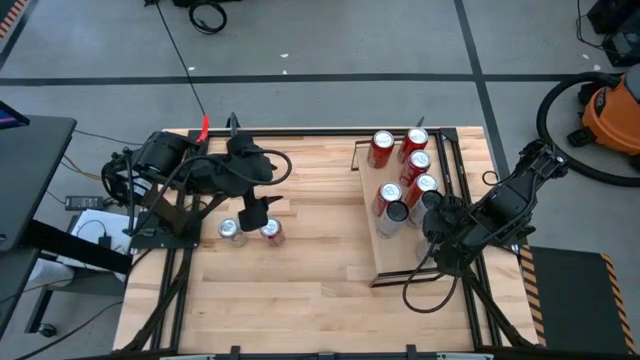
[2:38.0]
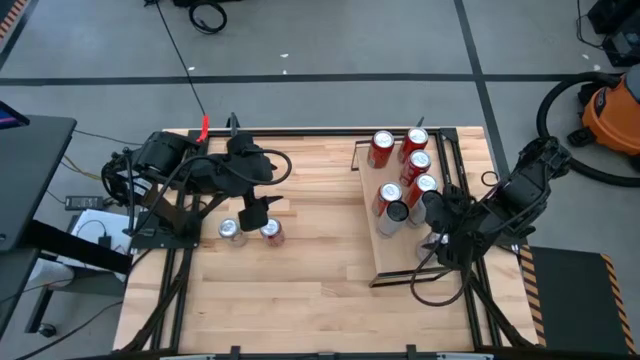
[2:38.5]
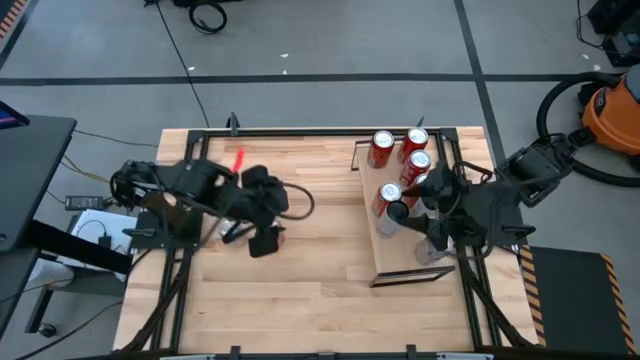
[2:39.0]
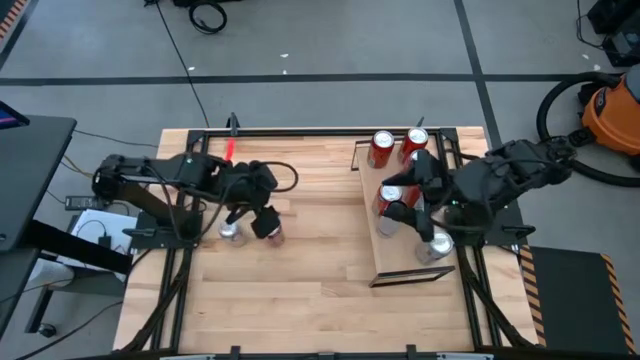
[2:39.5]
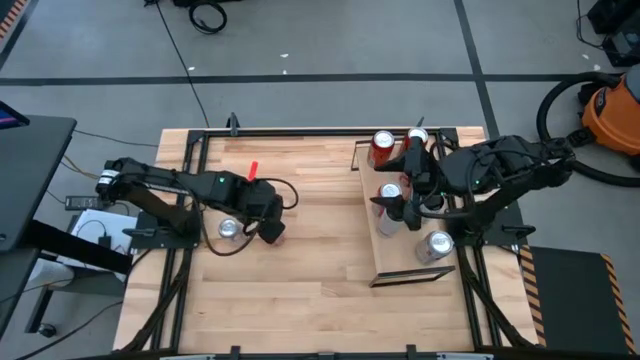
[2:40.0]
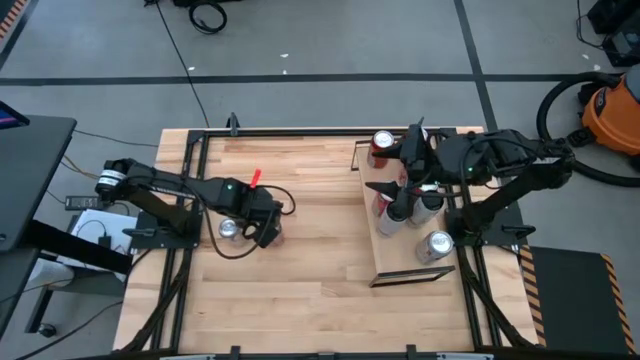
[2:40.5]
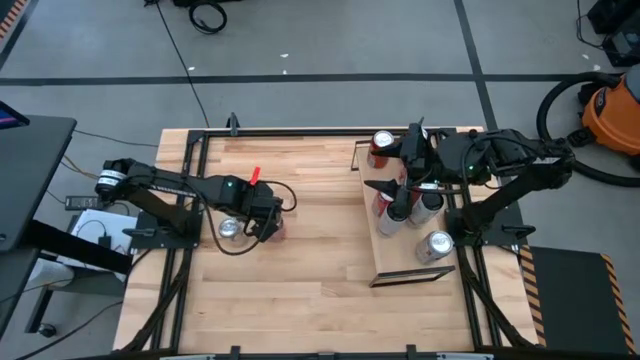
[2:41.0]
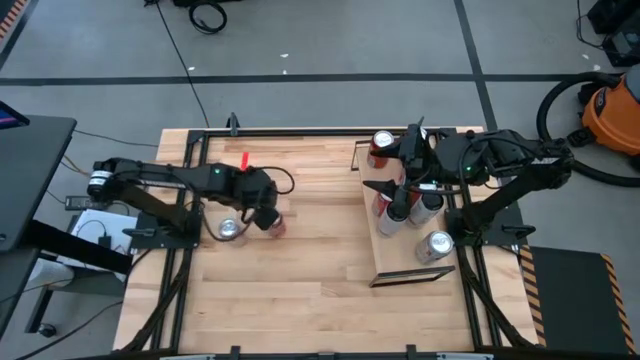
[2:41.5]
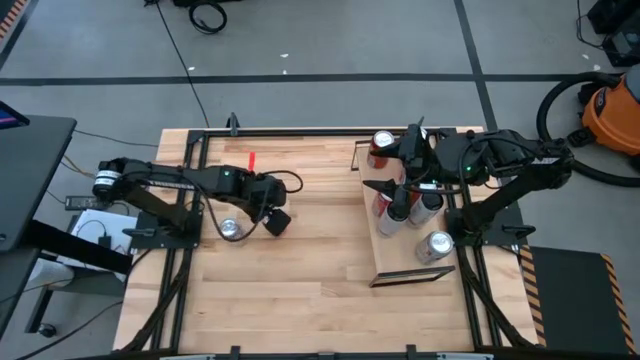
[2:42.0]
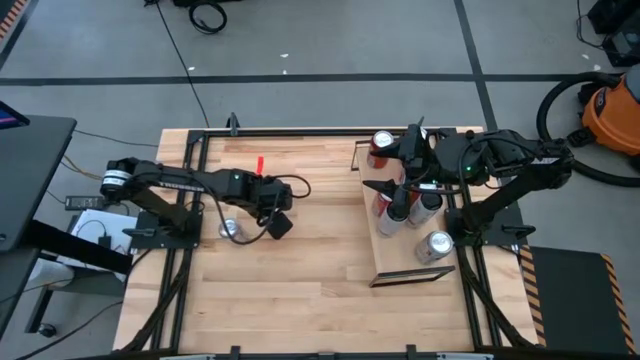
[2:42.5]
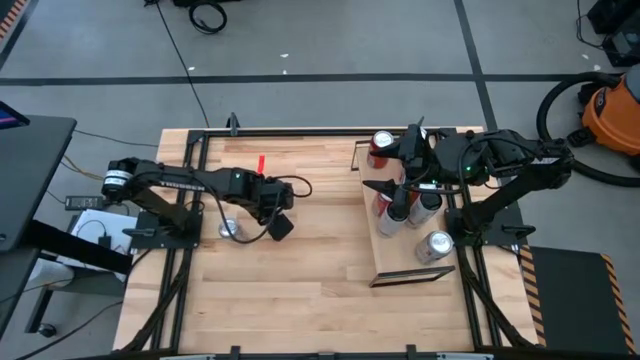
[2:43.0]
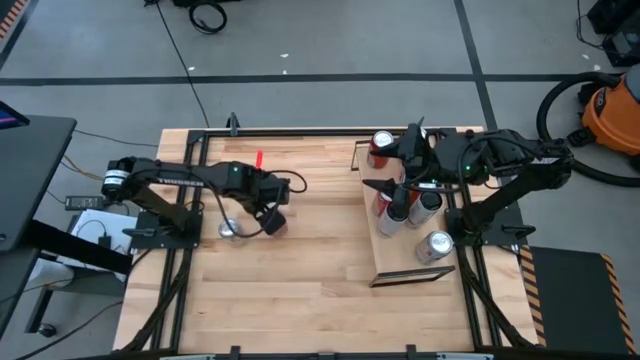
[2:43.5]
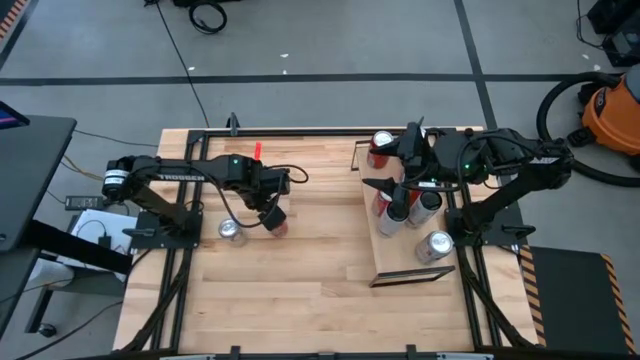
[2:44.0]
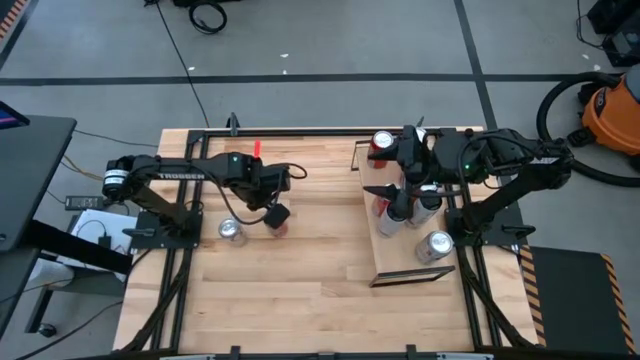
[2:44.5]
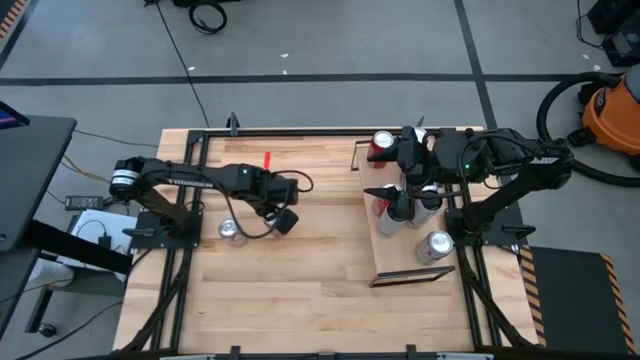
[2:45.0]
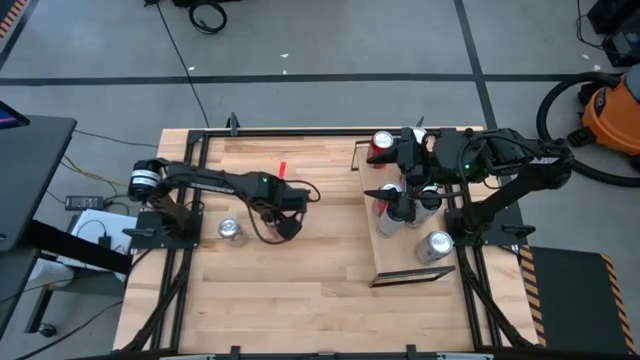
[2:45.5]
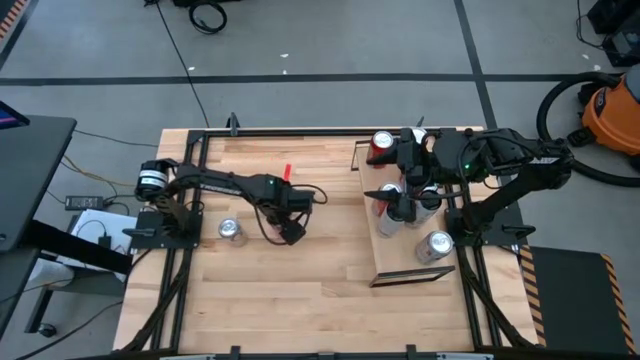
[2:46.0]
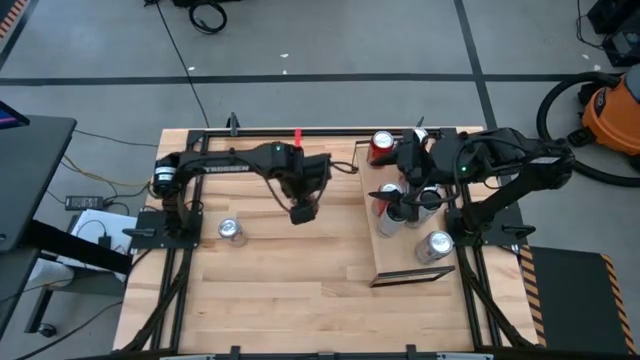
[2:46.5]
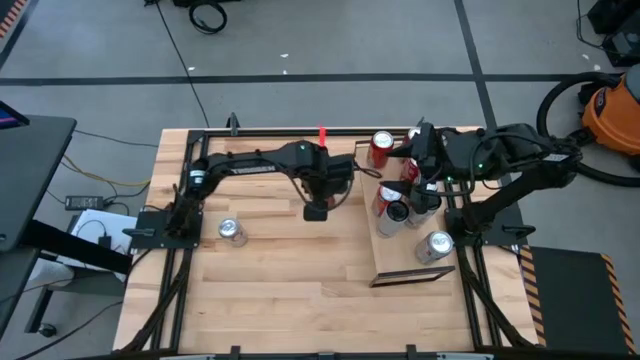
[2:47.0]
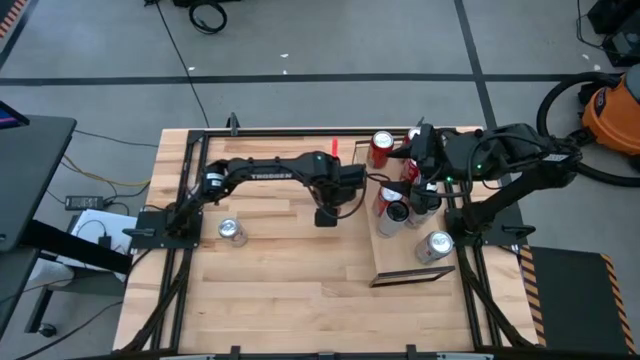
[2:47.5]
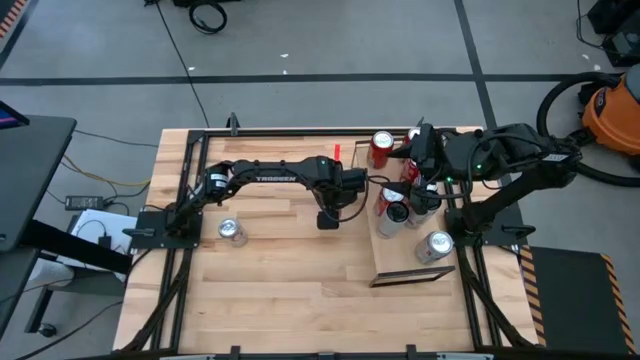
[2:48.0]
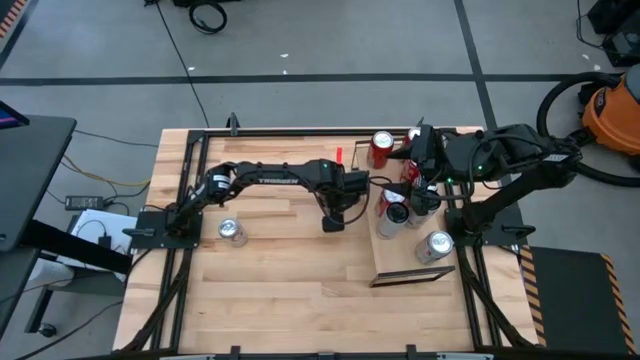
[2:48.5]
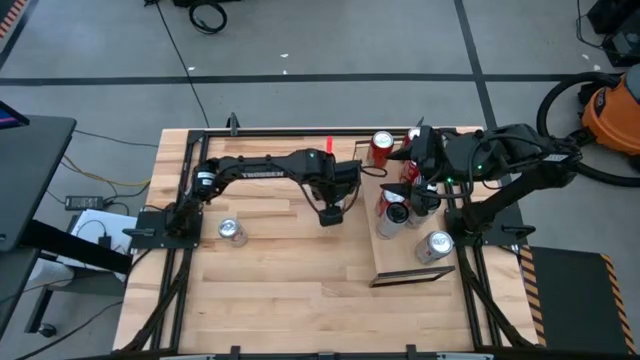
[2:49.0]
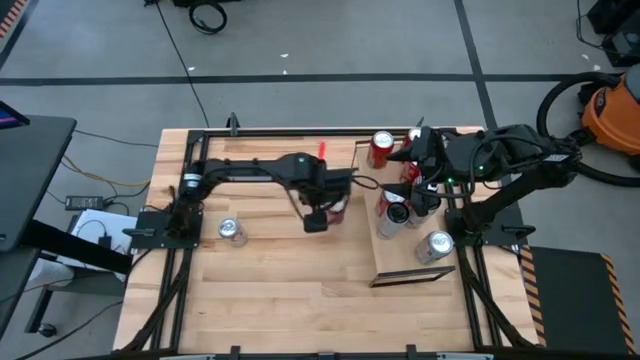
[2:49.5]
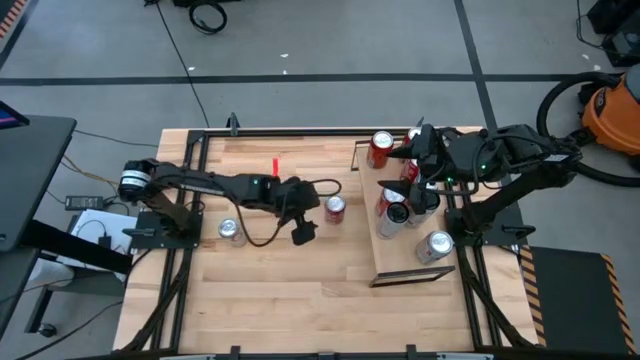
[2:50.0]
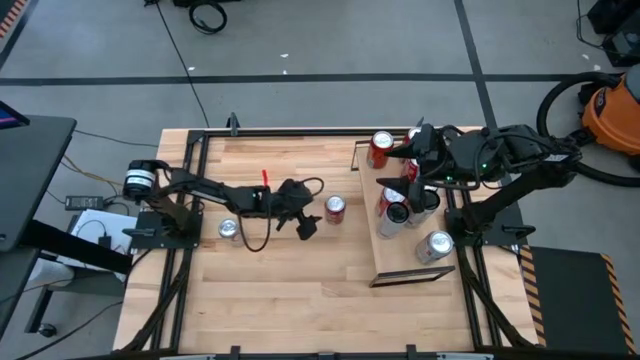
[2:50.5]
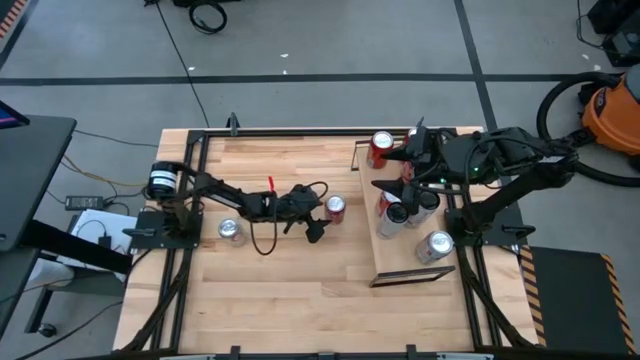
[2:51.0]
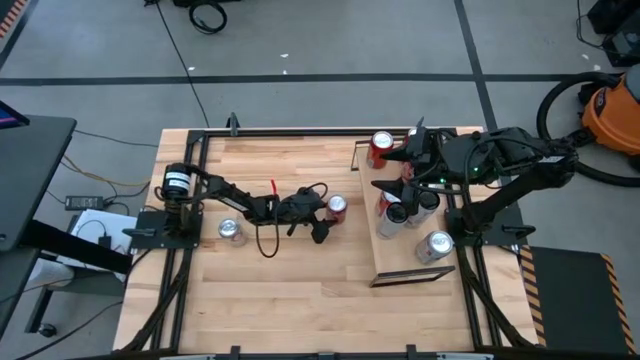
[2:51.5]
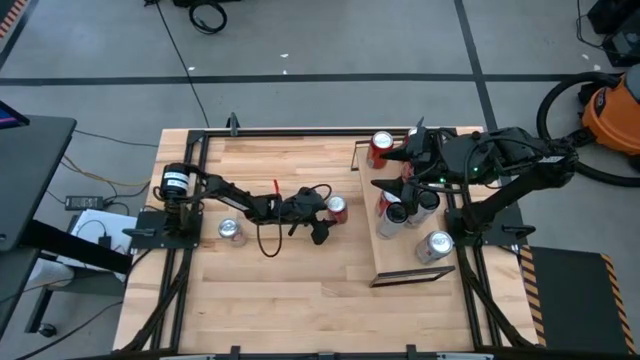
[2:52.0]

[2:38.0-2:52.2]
Task: Place canned beverage on shelf
Put the red white soda can on the shelf aligned with the other red white soda can

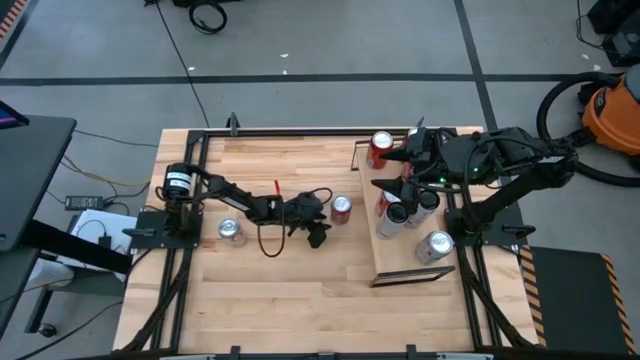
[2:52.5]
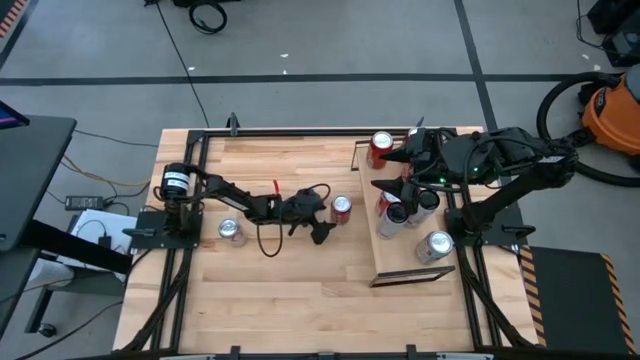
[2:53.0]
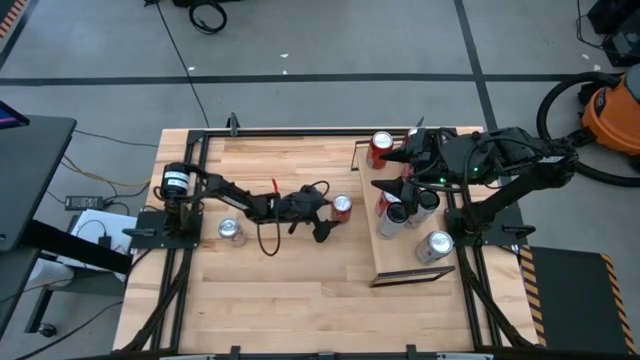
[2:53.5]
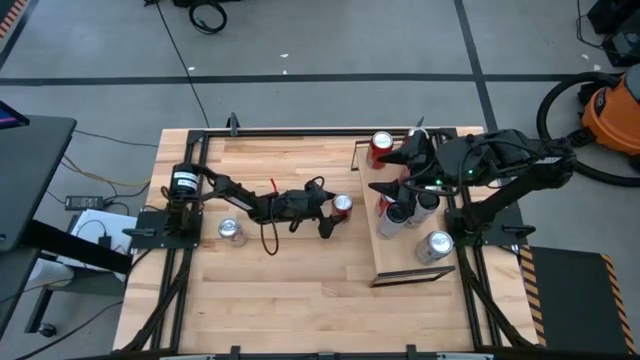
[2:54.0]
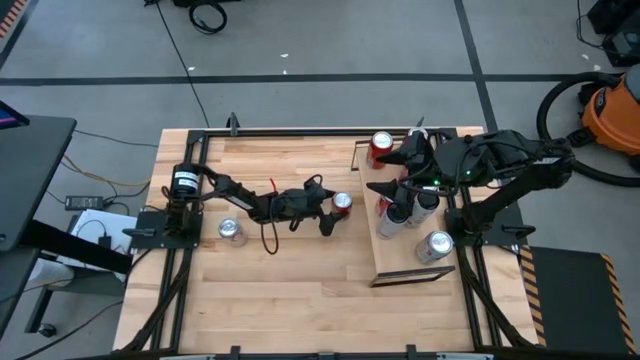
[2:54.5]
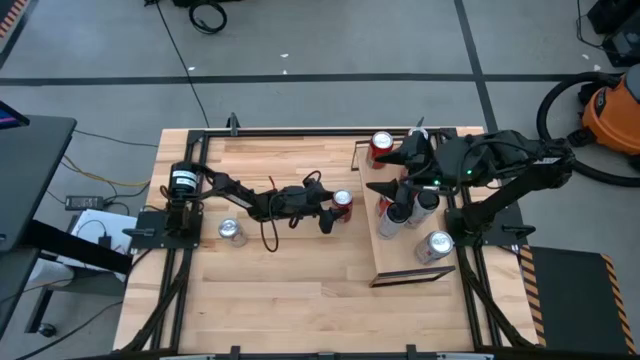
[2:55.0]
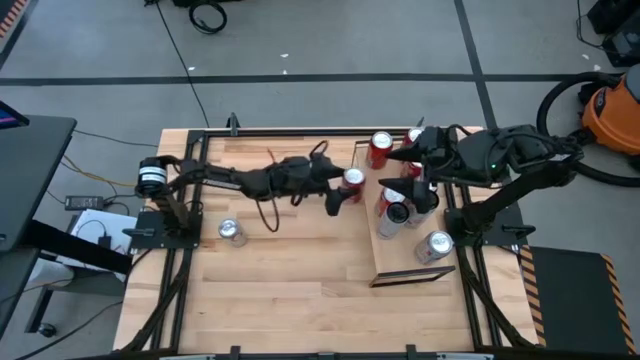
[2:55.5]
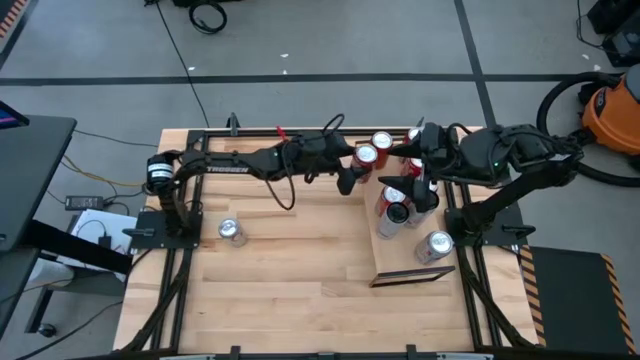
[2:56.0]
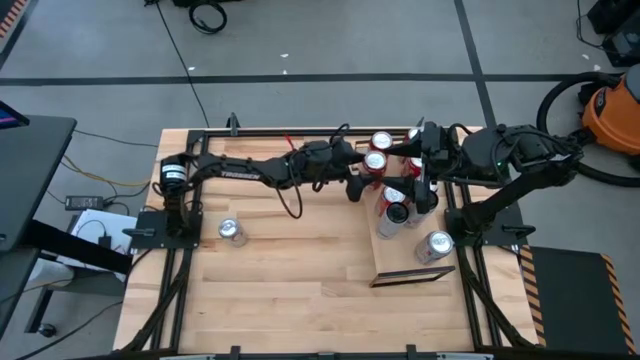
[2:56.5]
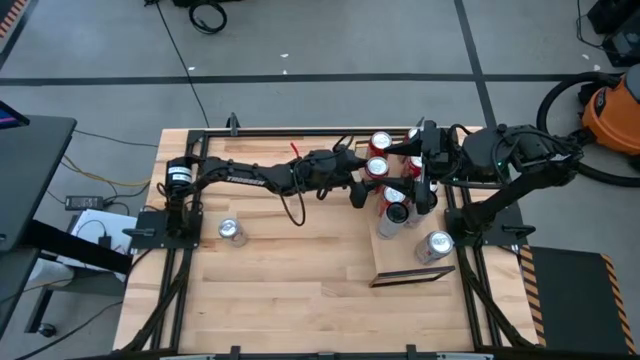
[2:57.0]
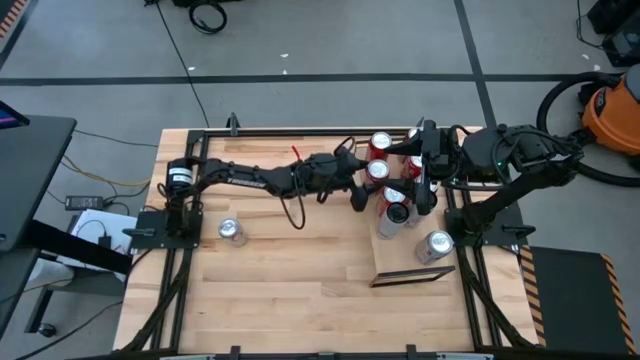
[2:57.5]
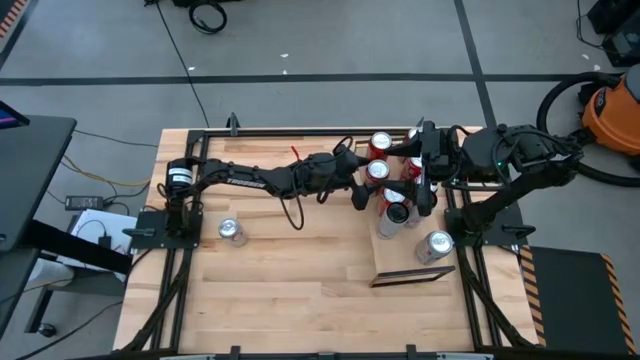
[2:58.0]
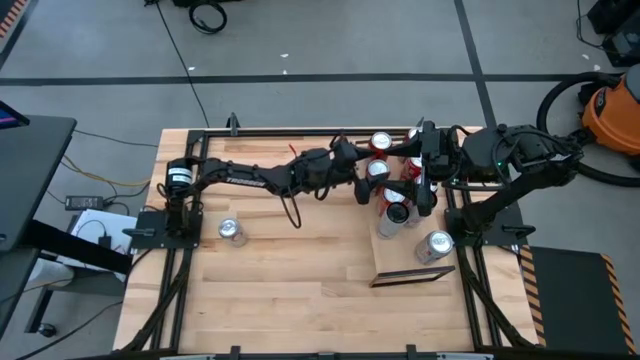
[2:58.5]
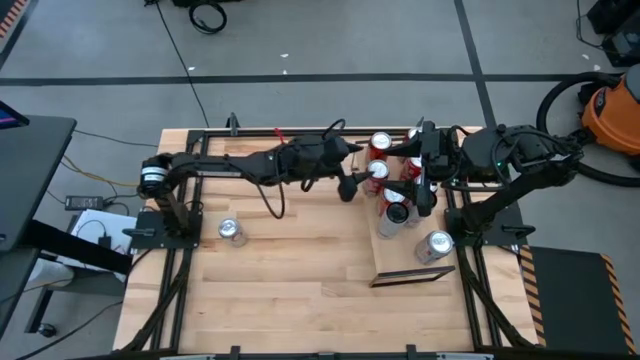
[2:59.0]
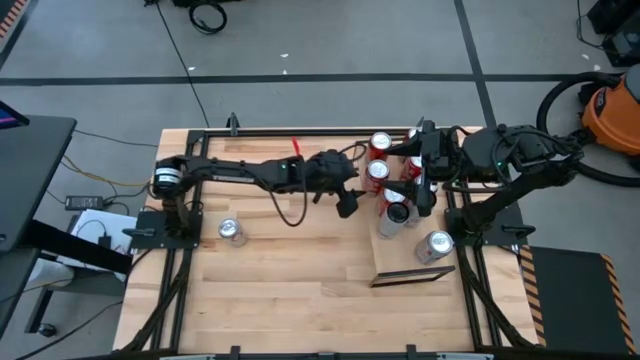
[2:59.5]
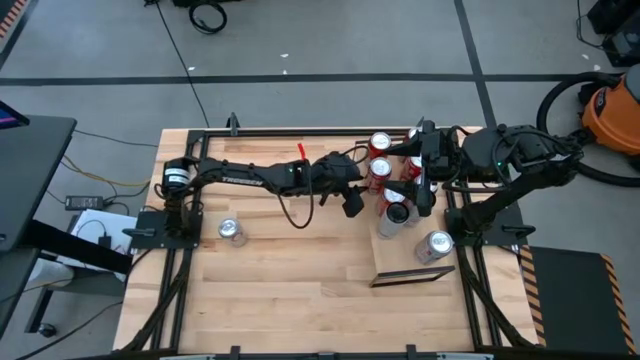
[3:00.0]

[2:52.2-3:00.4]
Put the red white soda can on the shelf aligned with the other red white soda can
